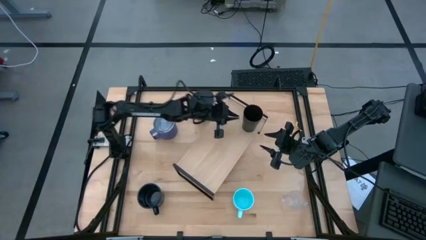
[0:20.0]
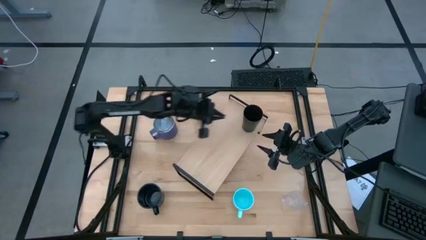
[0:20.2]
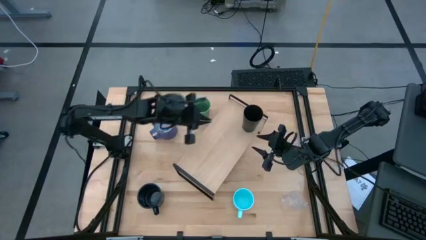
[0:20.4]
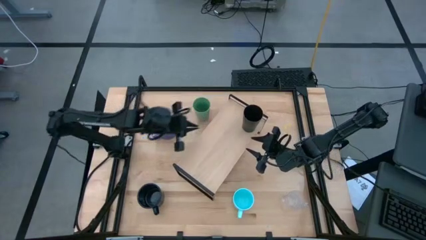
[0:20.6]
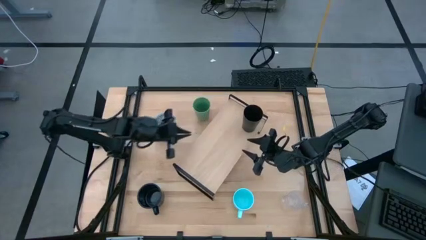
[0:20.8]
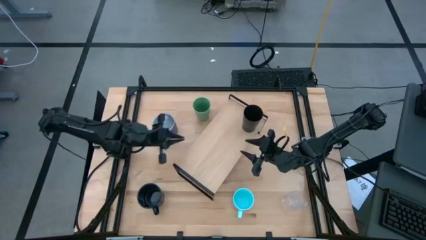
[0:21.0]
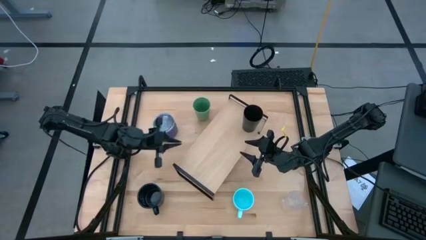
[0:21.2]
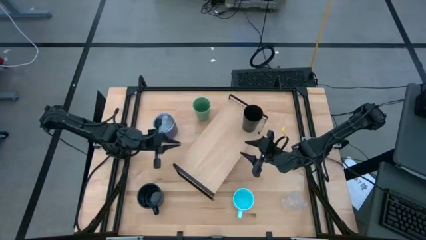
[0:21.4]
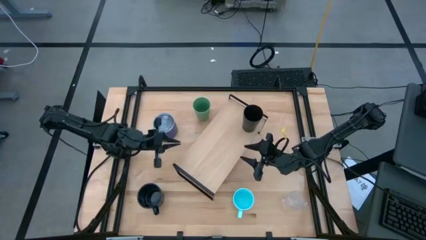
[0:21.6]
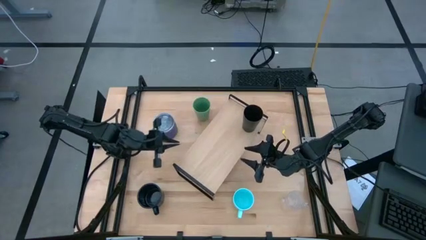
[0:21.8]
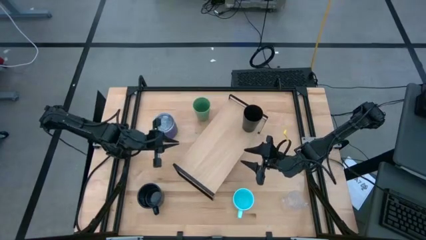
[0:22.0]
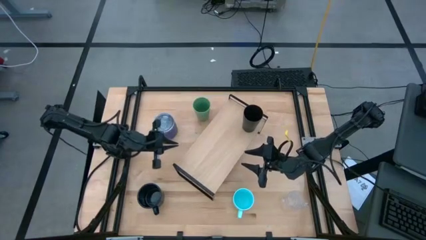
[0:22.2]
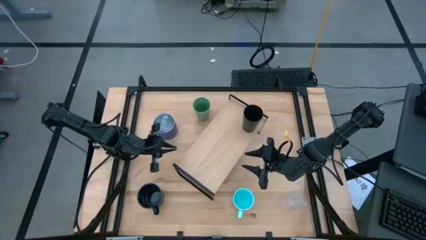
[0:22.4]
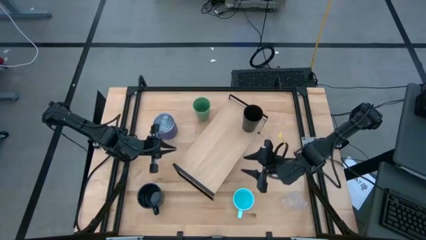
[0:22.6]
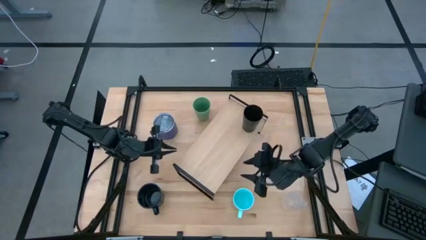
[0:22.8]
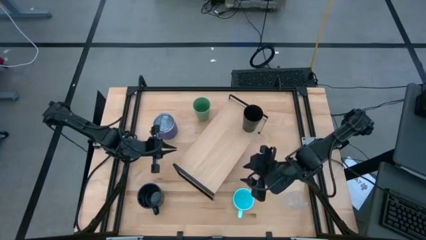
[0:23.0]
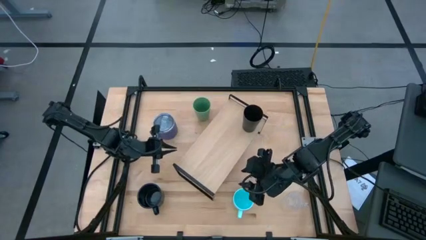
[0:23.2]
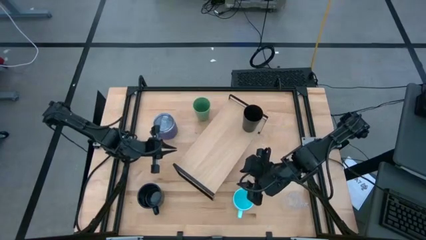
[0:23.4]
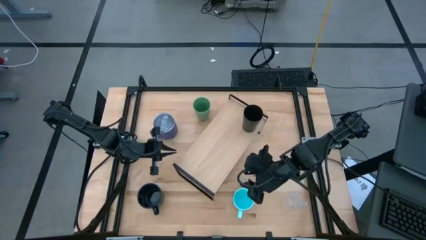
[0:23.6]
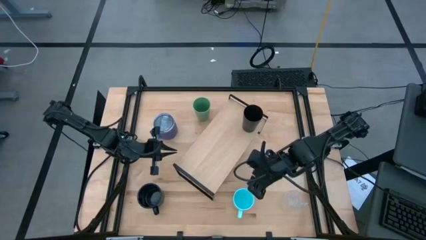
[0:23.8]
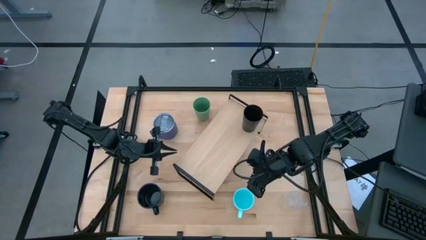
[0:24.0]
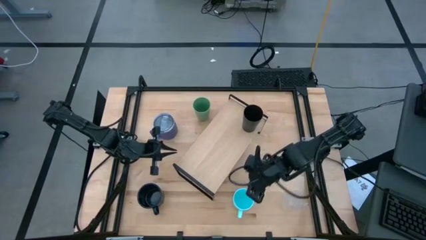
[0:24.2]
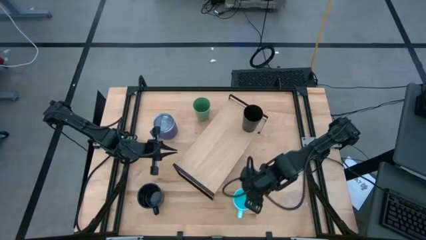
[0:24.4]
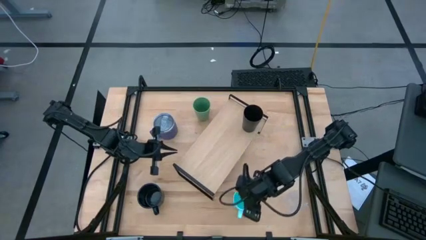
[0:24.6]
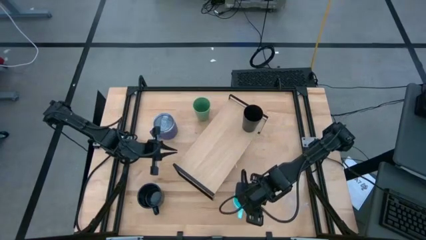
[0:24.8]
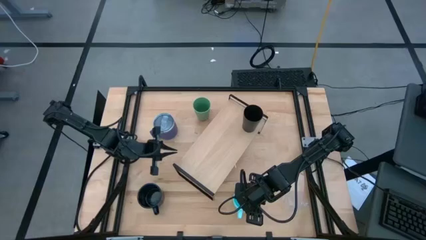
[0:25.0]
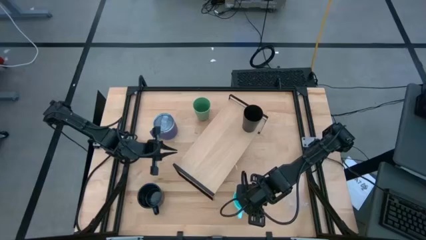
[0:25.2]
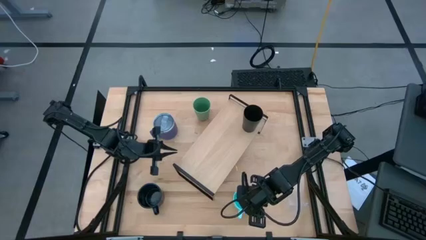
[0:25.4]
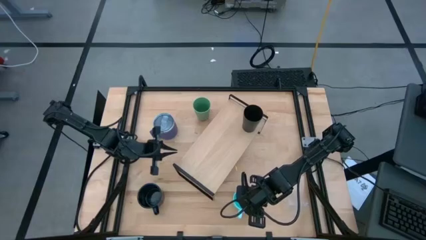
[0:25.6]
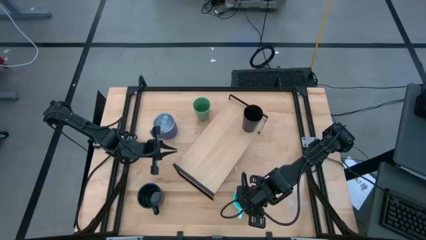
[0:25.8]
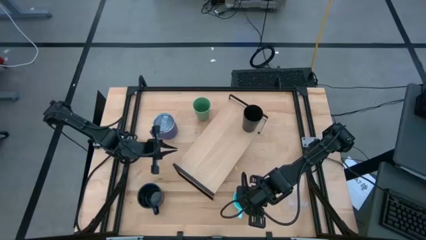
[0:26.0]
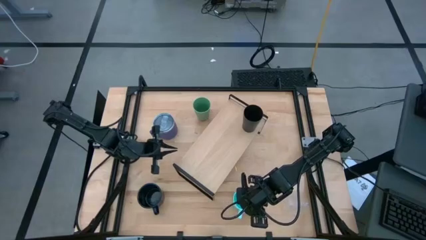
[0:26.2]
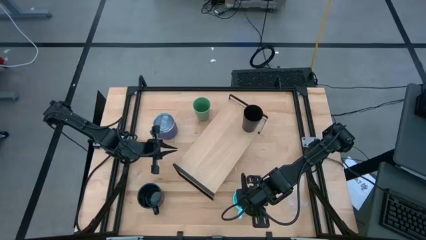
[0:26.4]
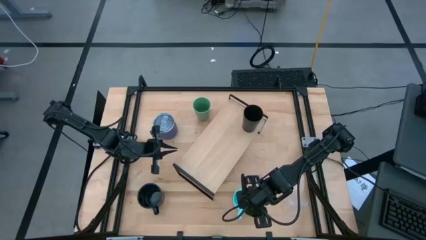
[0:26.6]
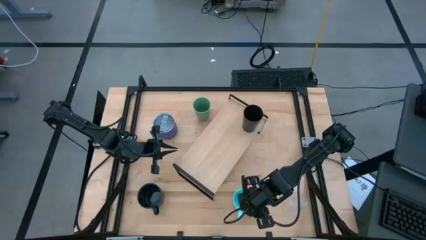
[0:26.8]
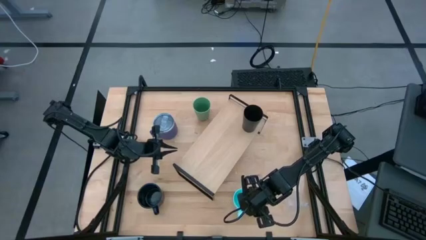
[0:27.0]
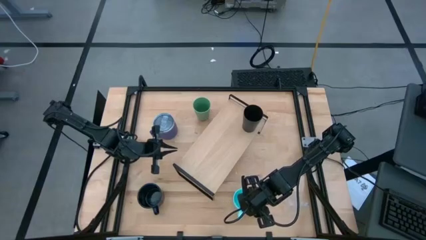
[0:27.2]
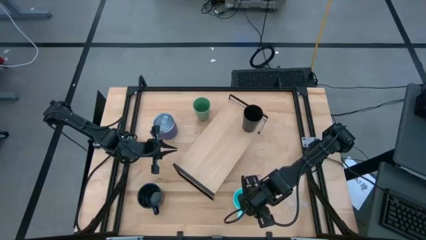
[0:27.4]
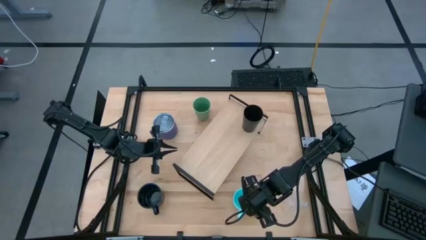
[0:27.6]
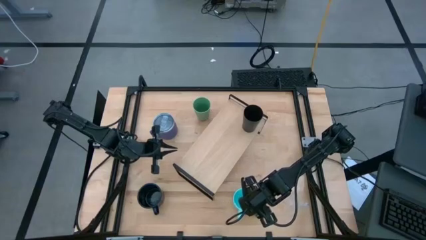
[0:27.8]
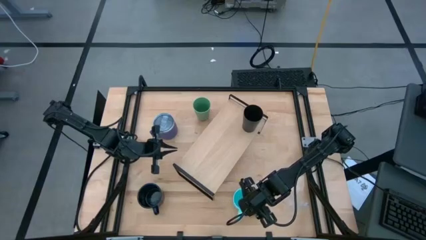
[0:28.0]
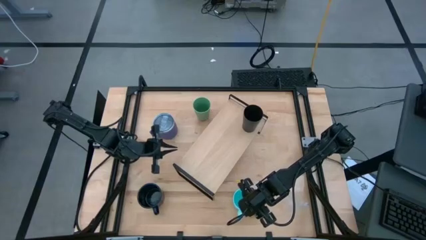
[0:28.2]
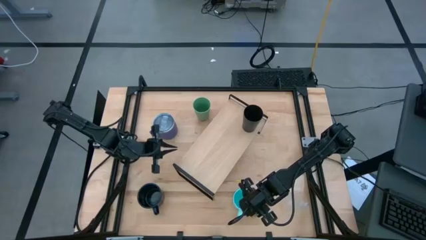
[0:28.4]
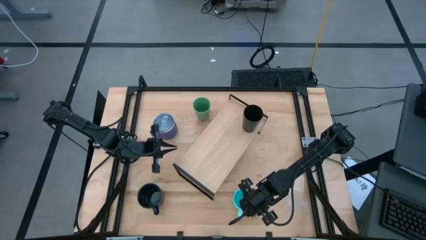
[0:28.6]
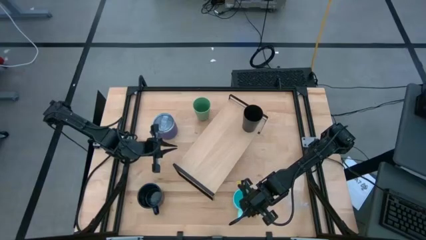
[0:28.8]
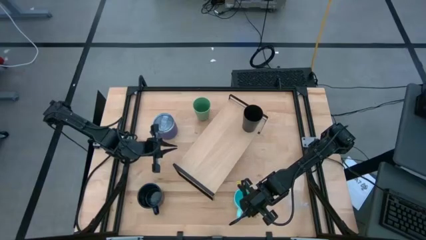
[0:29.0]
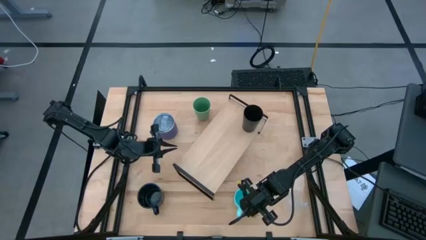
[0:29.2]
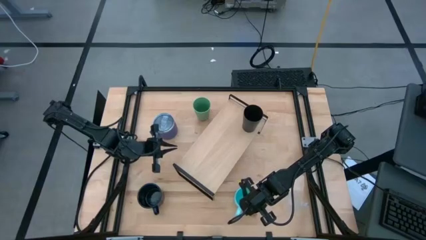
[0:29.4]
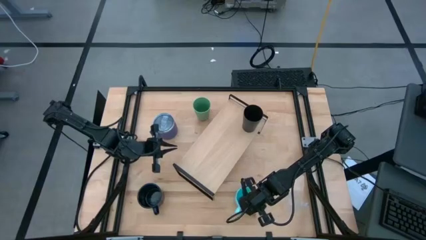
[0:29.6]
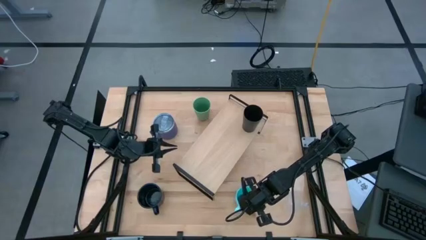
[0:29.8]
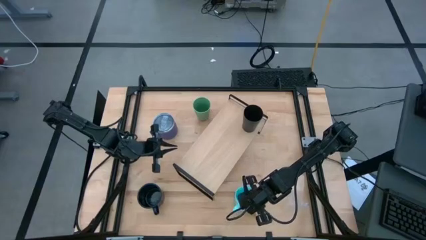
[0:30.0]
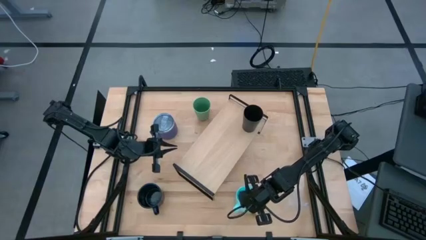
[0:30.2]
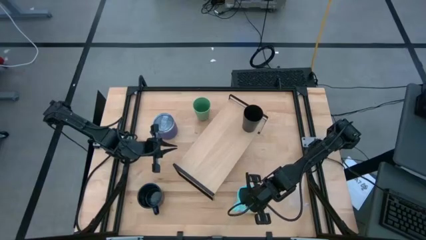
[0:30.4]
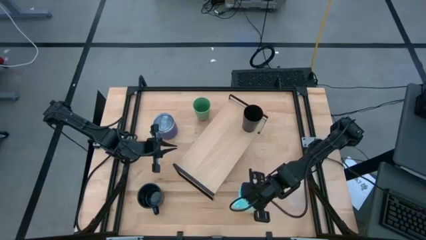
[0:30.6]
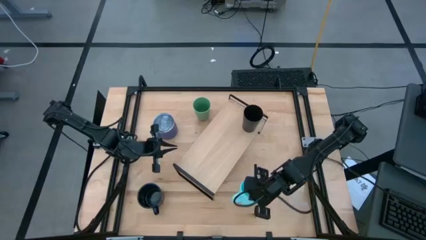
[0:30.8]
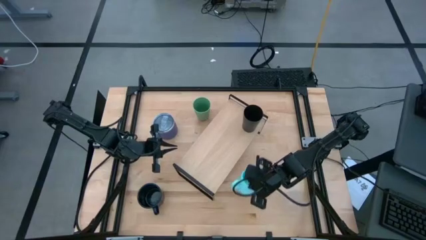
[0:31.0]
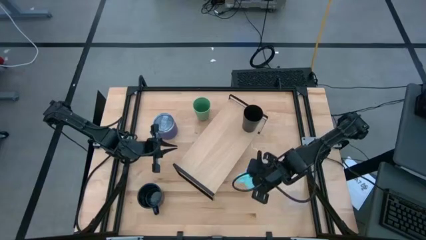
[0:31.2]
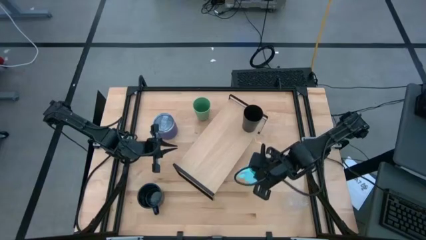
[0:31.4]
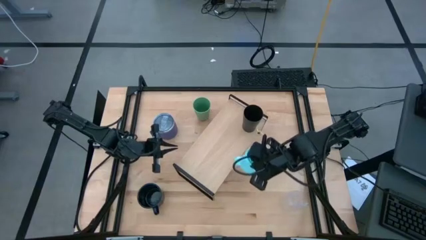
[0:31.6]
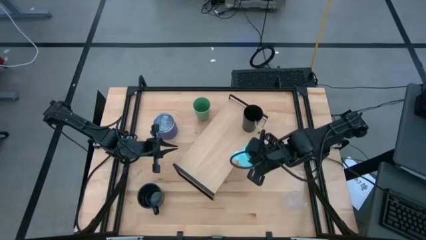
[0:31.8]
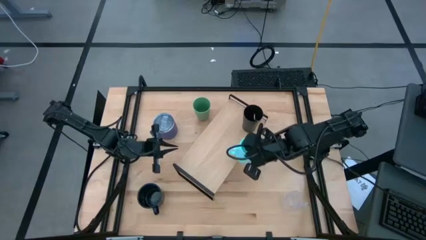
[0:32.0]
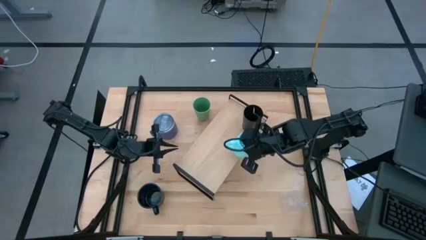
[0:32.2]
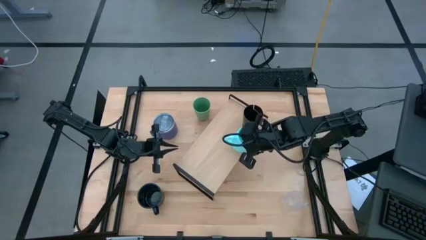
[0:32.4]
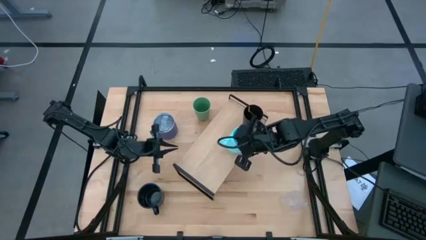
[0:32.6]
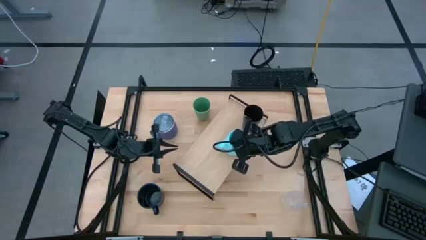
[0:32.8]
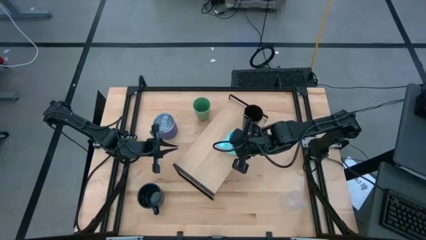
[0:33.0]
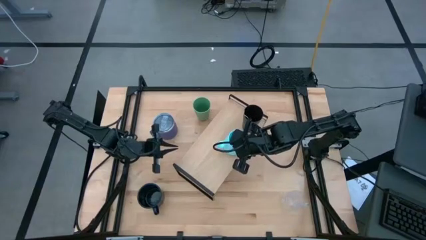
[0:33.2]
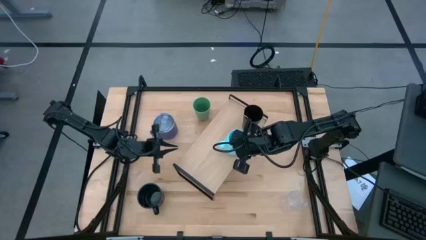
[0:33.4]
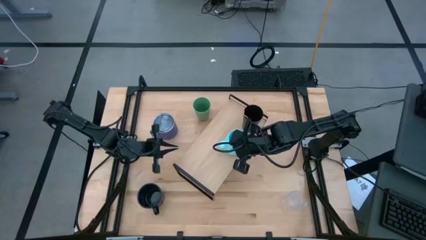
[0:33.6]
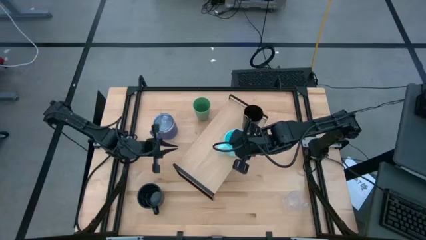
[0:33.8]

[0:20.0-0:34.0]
Task: Stack small to large cups/mugs on shelf
Put the light blue mug on the shelf
